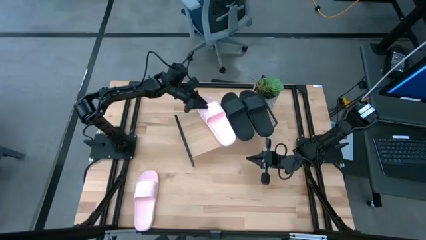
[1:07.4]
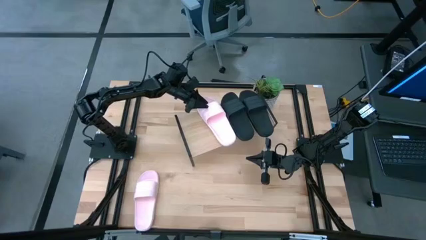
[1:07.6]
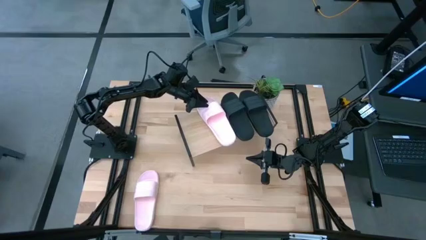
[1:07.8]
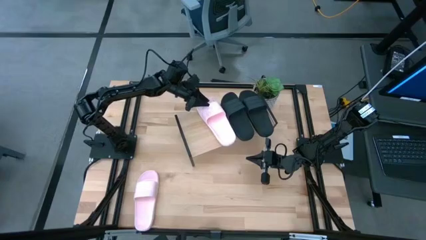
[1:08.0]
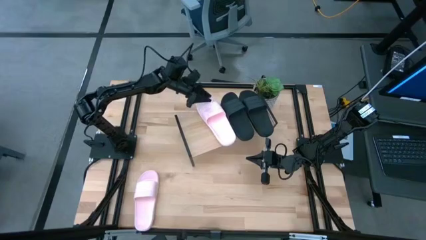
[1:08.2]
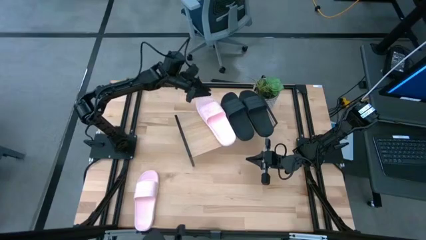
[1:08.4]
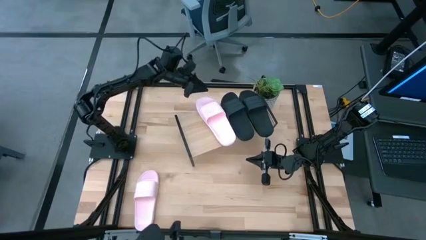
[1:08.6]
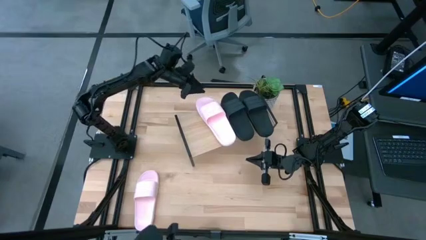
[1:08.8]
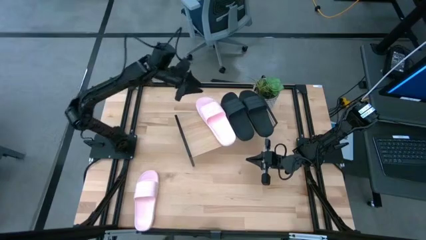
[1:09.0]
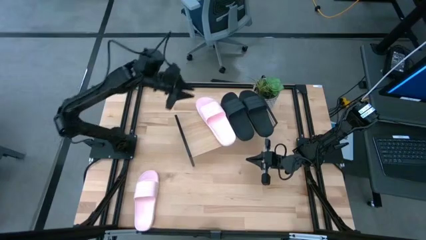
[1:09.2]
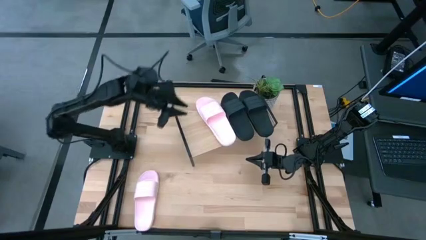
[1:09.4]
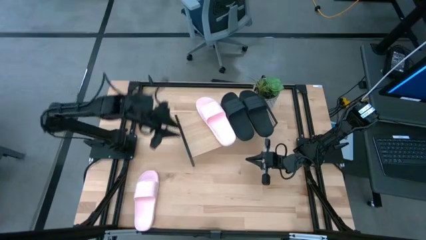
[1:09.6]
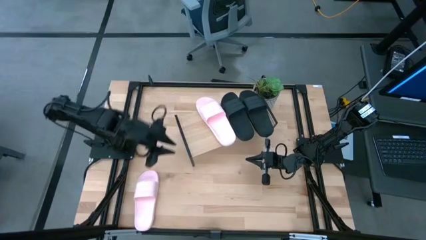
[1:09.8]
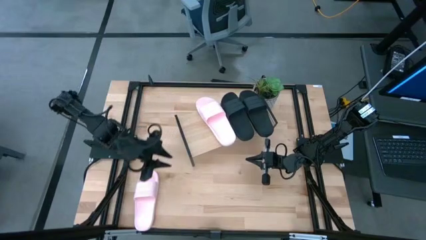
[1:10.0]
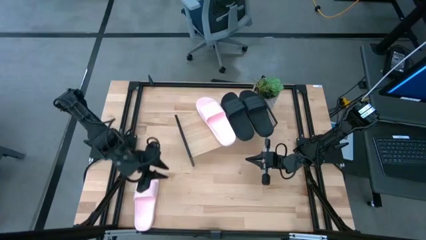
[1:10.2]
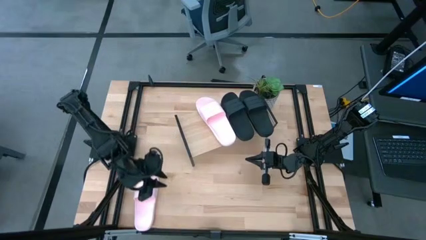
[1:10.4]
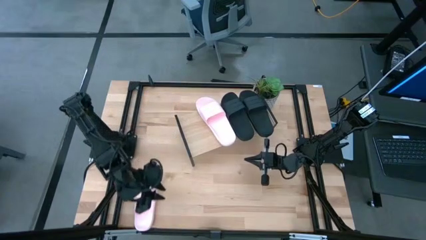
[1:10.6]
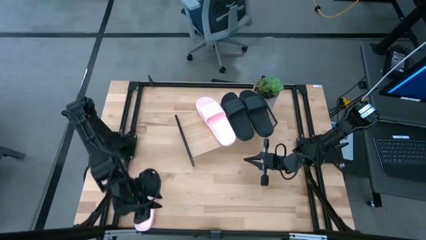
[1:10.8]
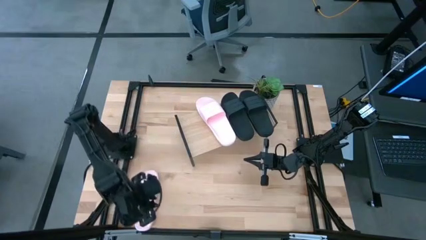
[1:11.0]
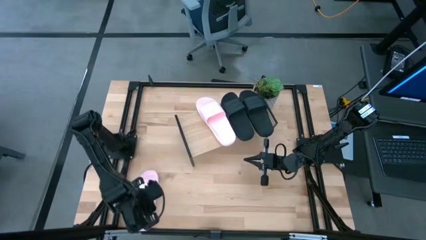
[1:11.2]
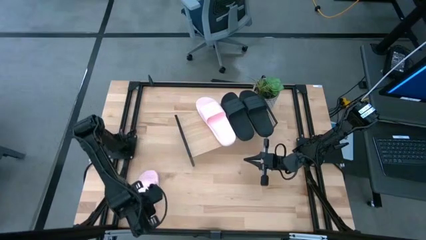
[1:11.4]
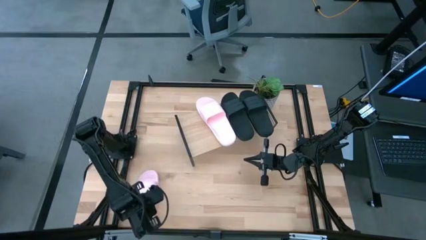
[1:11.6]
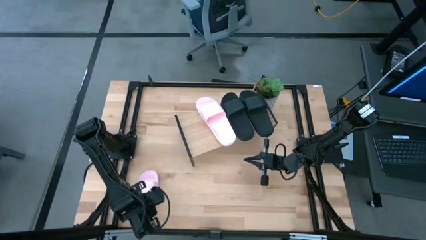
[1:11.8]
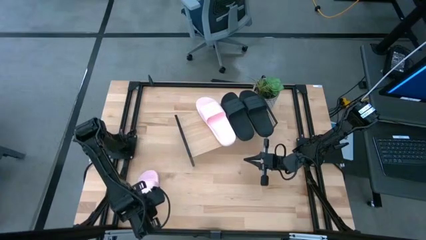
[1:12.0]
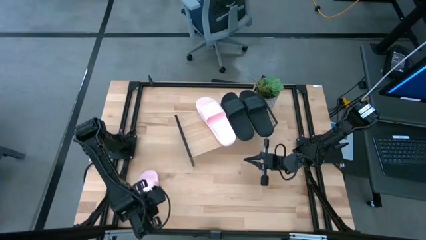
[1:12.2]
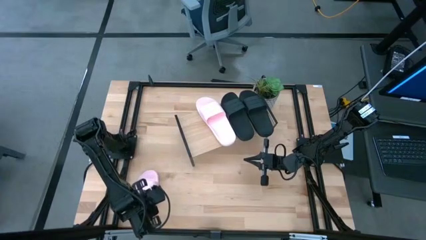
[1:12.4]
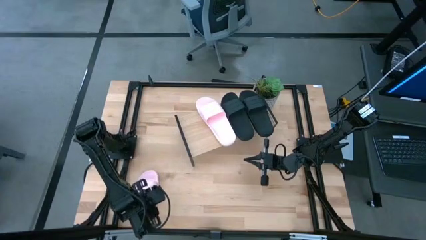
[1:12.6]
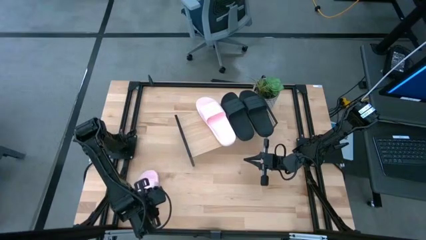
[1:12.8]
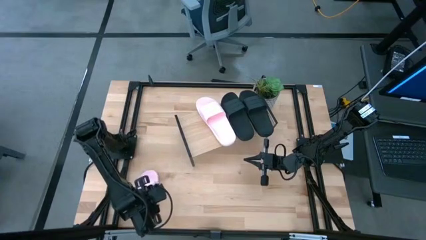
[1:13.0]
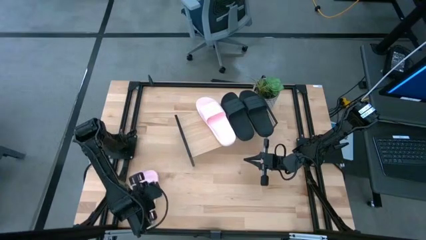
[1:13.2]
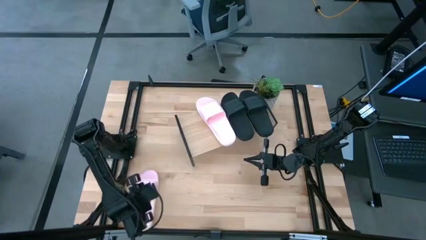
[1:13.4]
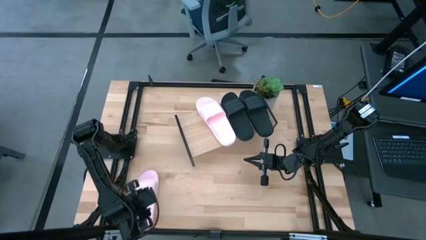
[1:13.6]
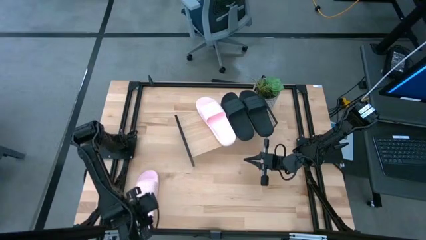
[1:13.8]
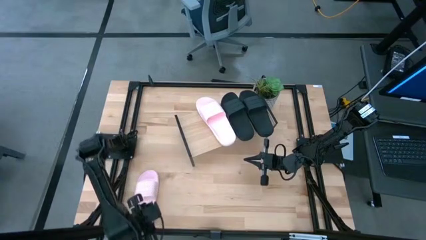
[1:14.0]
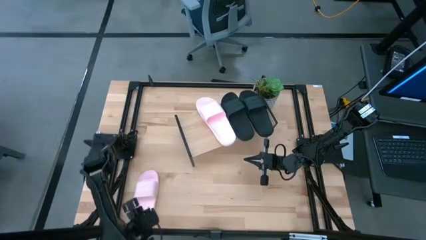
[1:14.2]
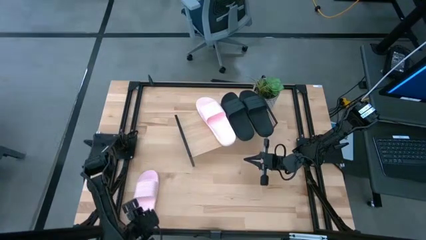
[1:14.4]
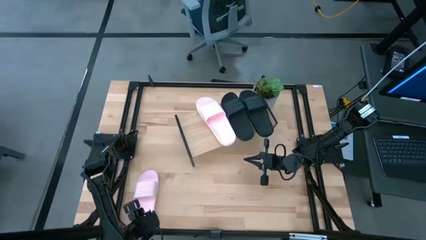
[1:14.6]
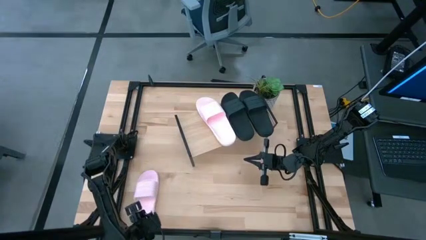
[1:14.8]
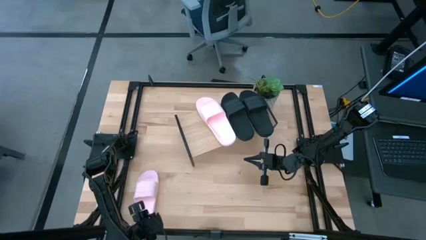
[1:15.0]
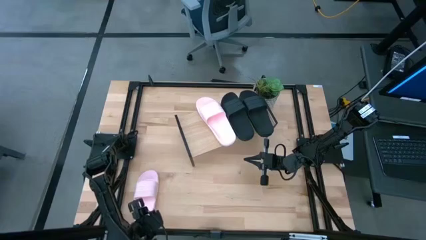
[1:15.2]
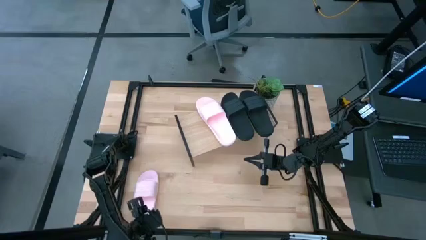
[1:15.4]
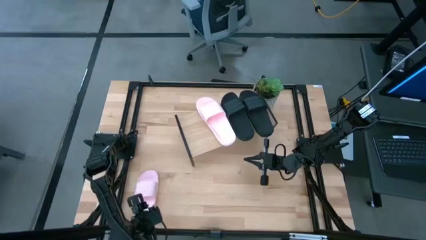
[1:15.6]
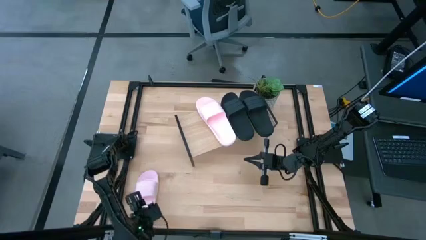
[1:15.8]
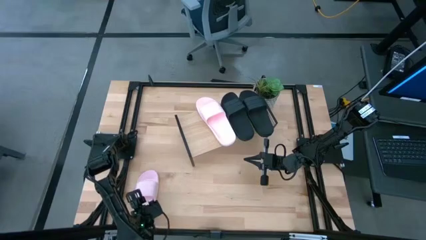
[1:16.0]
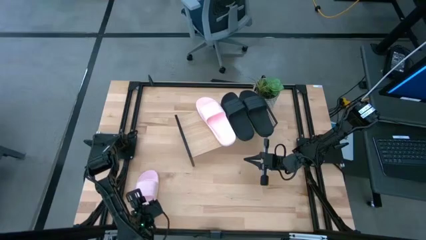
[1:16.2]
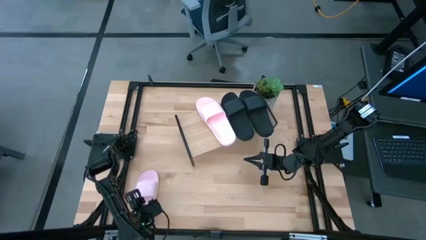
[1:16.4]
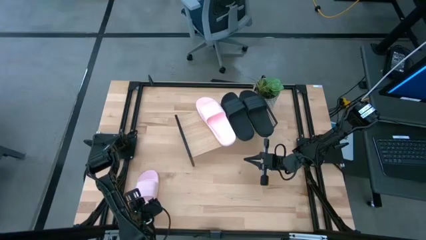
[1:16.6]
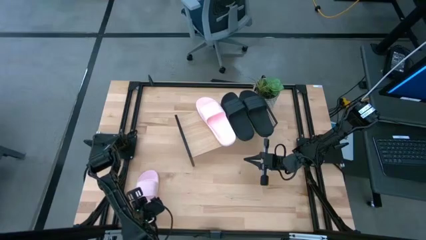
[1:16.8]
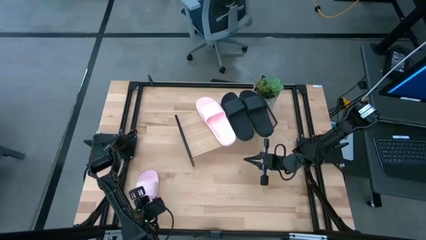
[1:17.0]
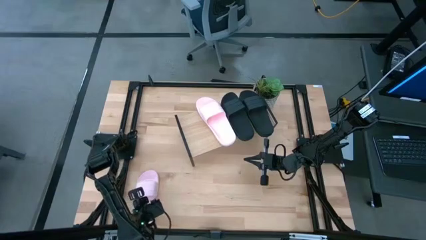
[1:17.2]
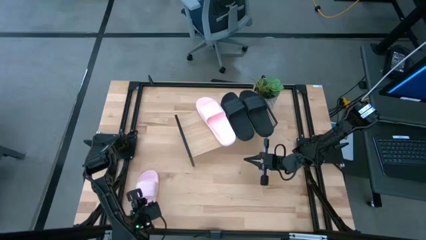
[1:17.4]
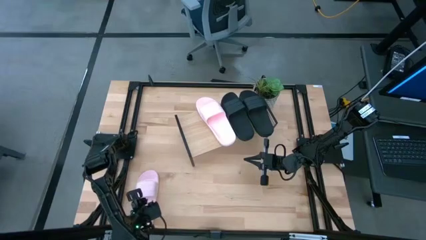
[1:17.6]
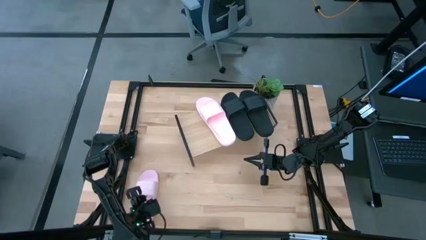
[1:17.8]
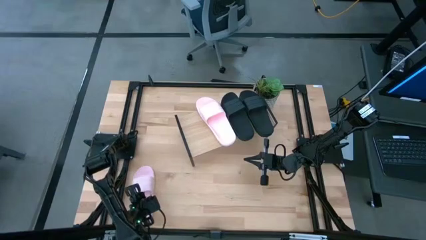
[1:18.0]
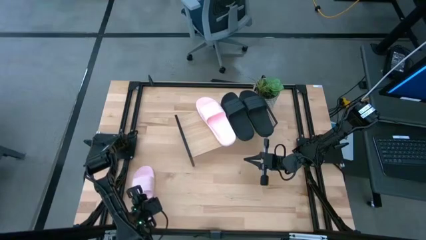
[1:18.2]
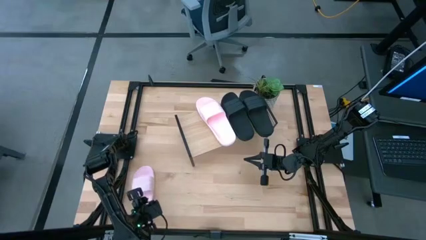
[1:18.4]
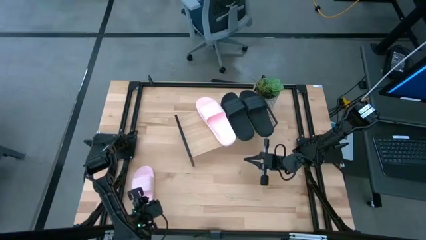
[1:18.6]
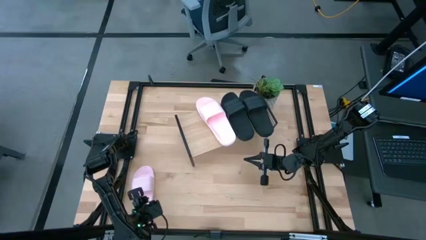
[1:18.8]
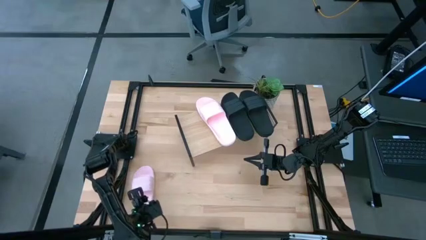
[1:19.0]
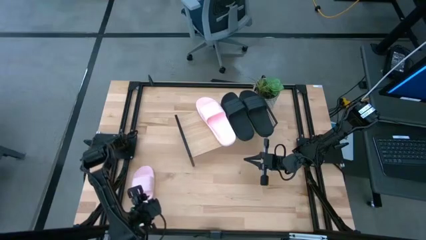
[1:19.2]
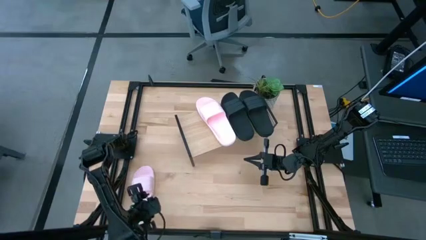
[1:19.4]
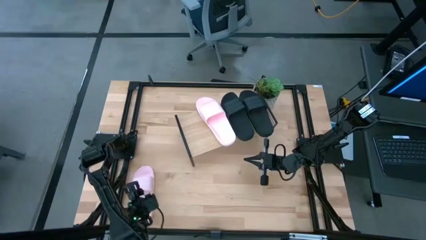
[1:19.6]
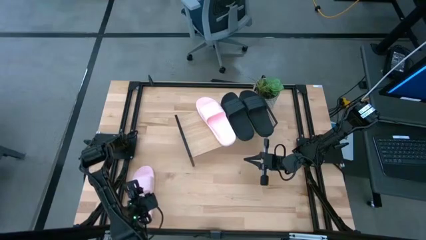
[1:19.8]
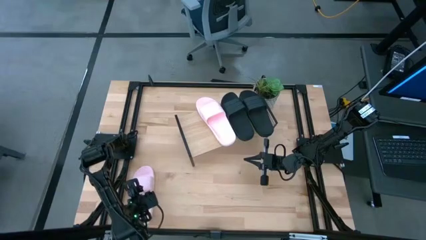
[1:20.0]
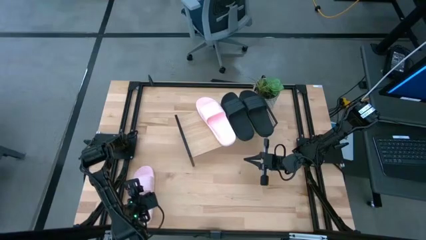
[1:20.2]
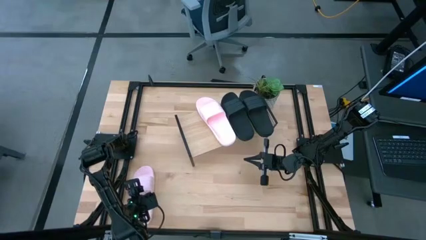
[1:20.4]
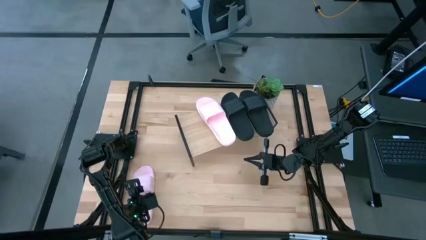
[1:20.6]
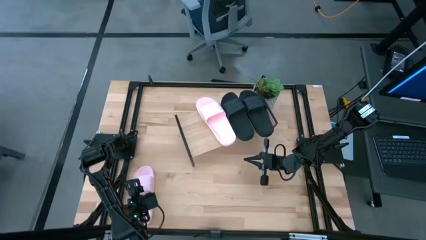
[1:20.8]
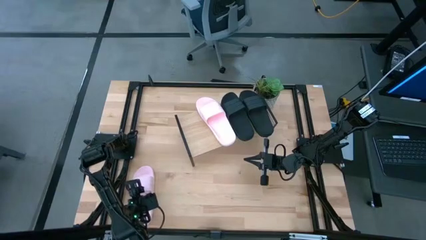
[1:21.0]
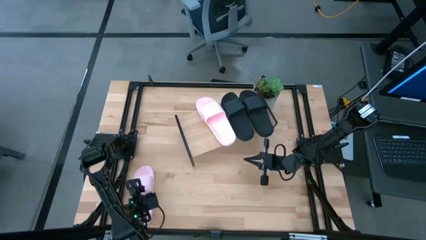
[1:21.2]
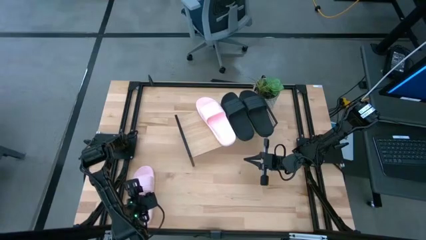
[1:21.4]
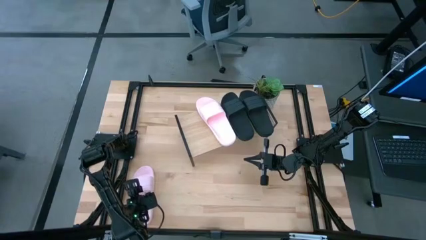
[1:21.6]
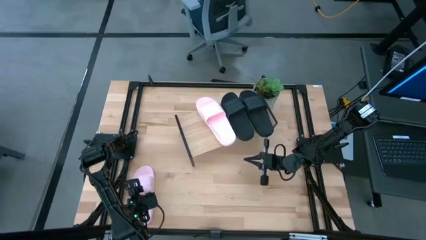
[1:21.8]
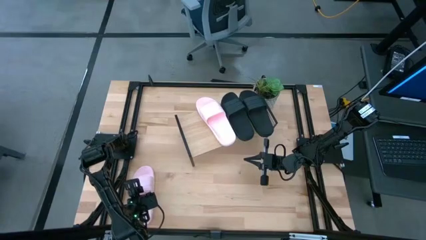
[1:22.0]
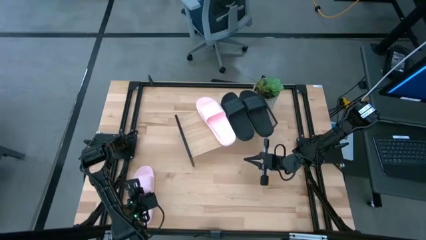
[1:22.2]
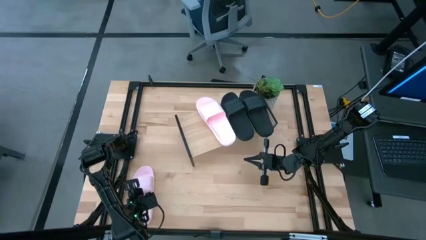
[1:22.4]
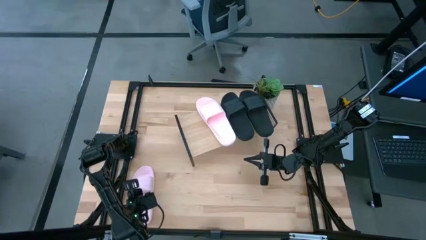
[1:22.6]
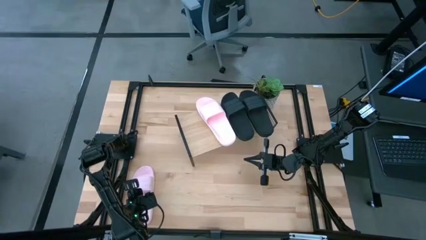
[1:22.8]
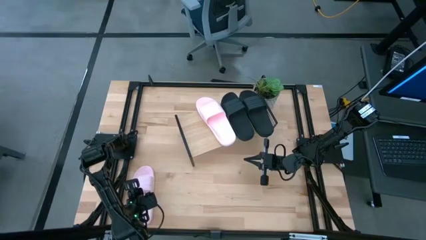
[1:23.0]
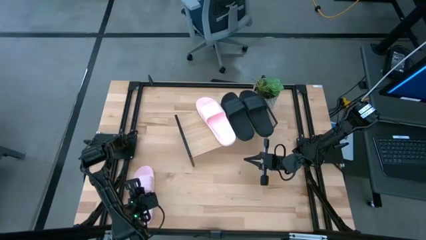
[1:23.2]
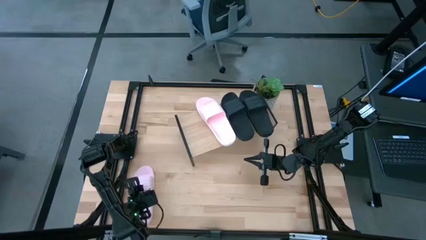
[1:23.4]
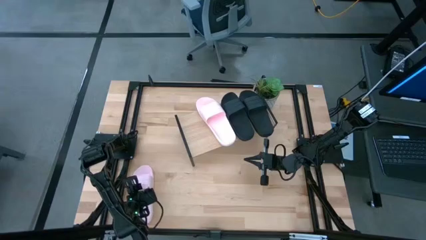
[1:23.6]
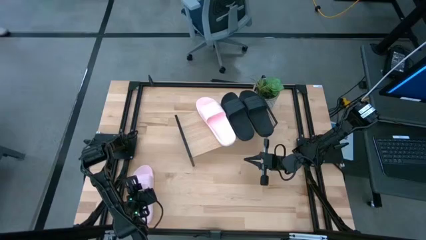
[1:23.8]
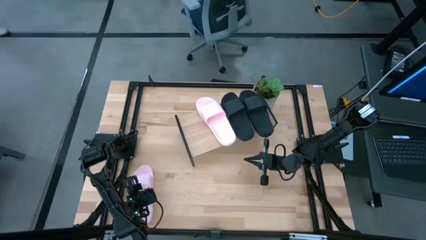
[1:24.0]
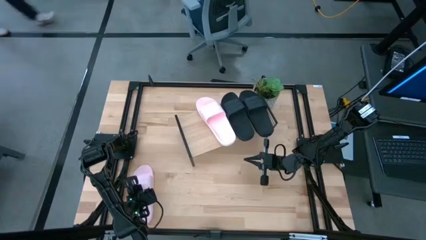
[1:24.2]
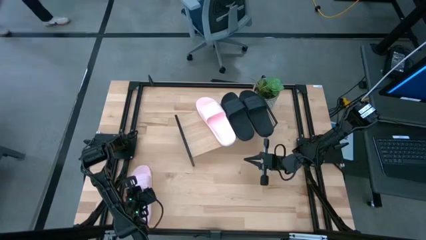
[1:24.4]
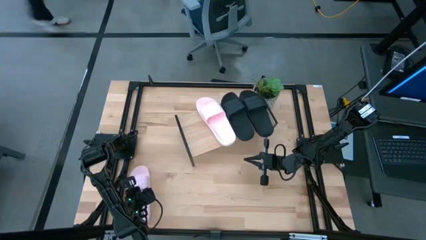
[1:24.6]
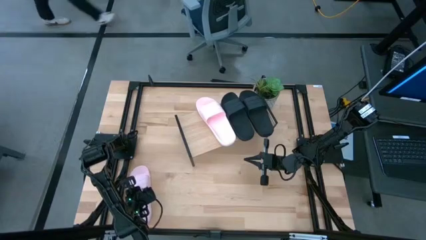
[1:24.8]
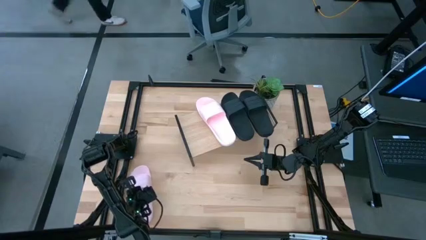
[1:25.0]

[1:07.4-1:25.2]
Task: Pick and place slides into the shelf
Put the left pink slide on the shelf
